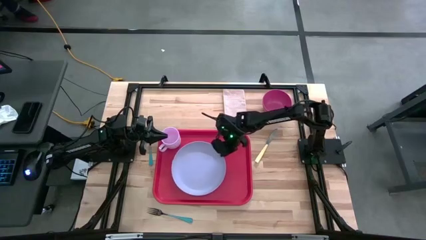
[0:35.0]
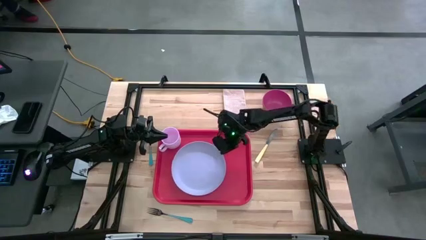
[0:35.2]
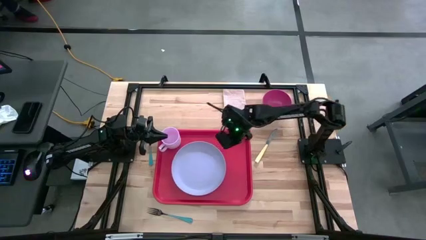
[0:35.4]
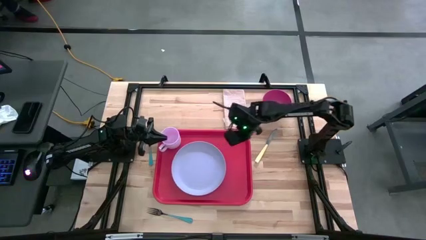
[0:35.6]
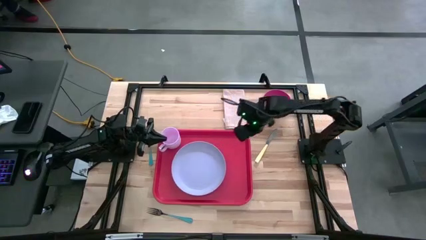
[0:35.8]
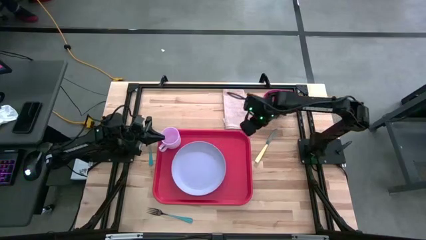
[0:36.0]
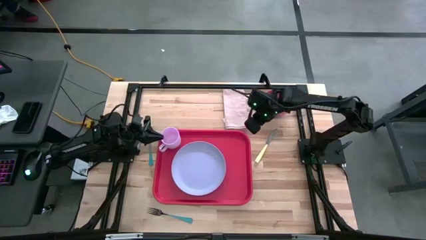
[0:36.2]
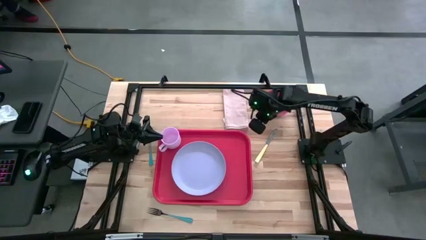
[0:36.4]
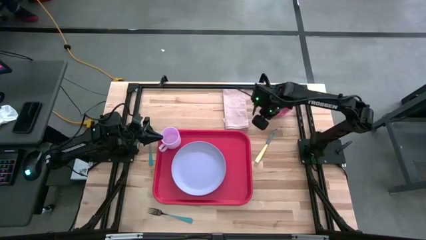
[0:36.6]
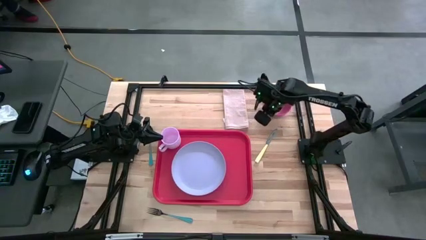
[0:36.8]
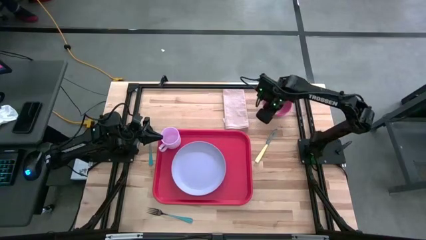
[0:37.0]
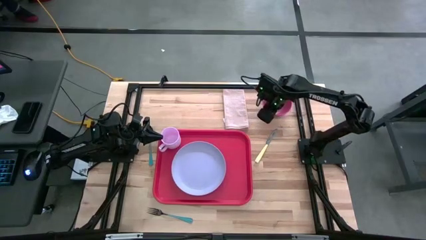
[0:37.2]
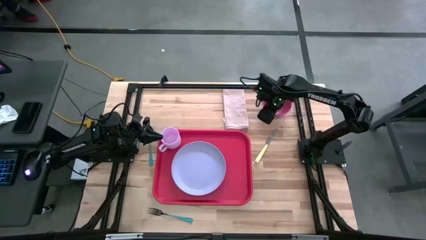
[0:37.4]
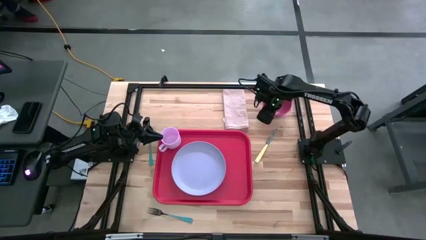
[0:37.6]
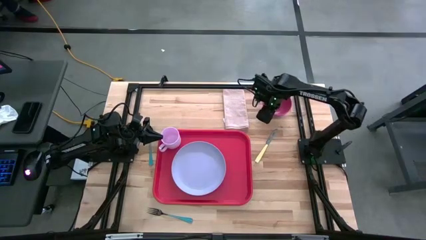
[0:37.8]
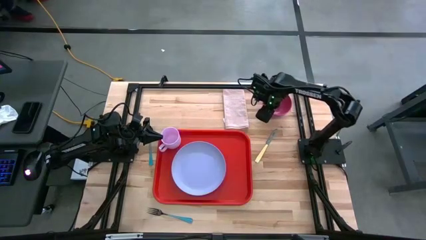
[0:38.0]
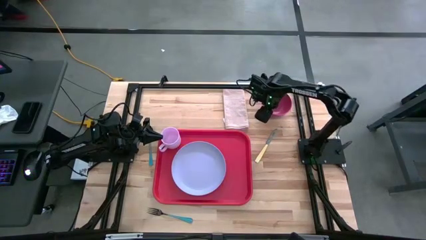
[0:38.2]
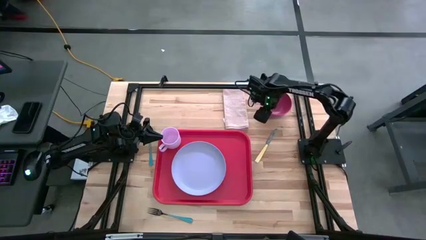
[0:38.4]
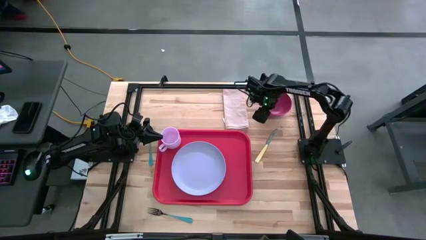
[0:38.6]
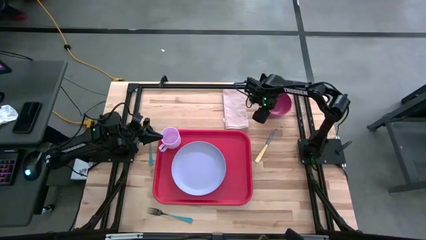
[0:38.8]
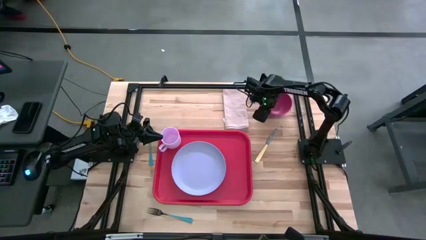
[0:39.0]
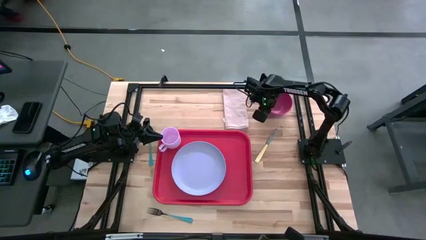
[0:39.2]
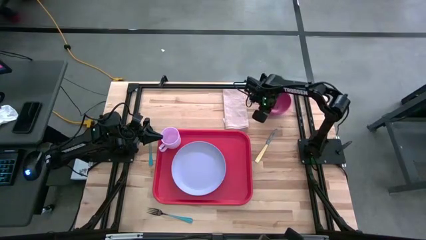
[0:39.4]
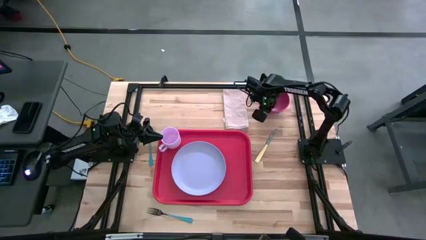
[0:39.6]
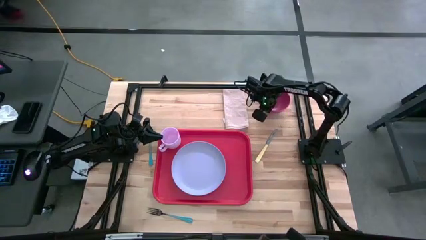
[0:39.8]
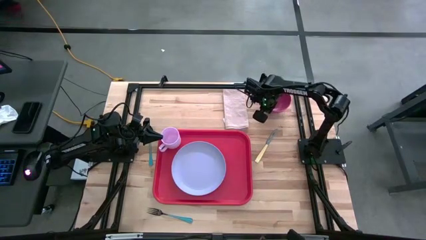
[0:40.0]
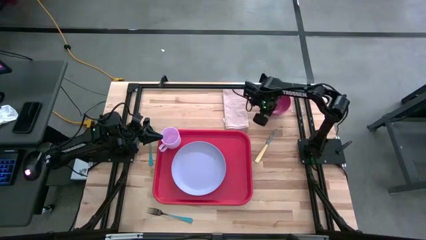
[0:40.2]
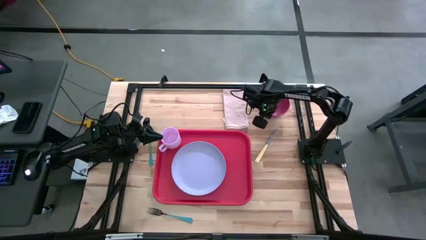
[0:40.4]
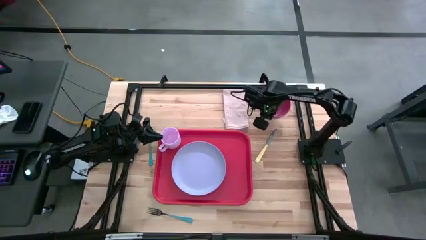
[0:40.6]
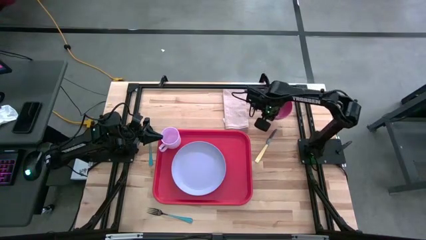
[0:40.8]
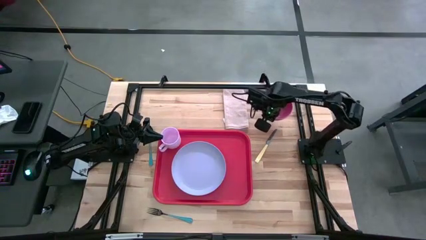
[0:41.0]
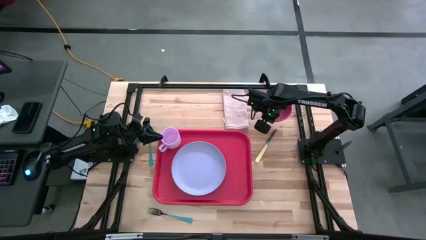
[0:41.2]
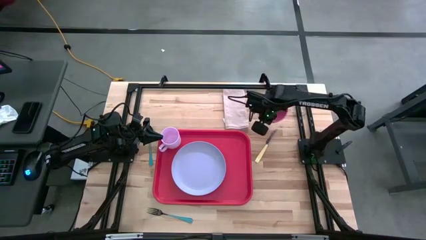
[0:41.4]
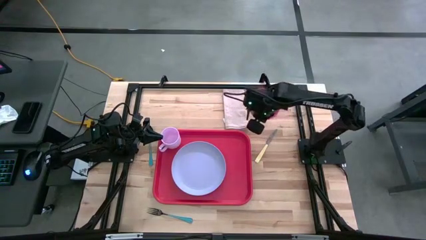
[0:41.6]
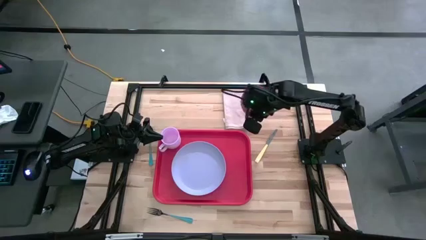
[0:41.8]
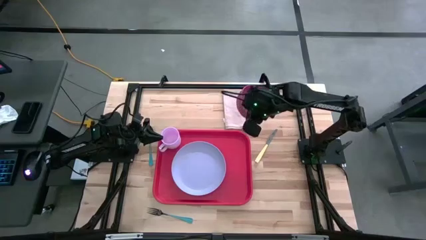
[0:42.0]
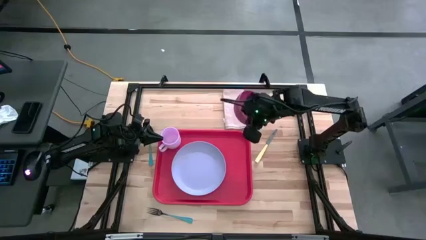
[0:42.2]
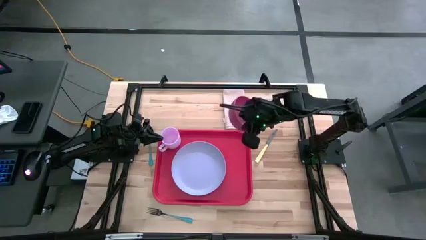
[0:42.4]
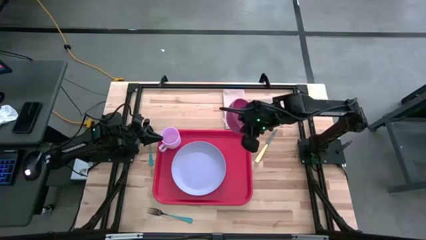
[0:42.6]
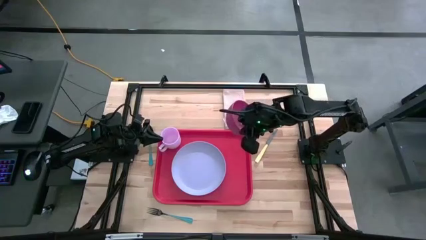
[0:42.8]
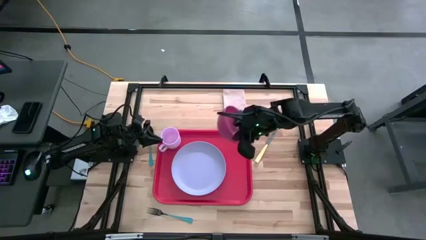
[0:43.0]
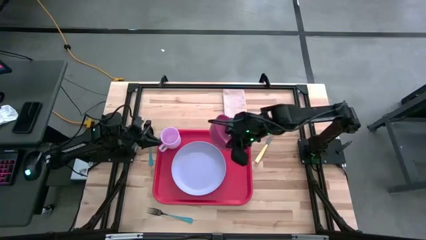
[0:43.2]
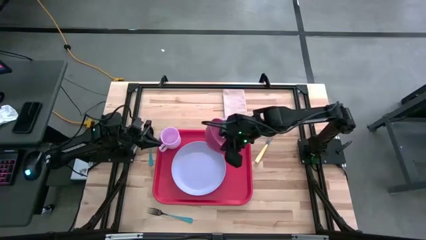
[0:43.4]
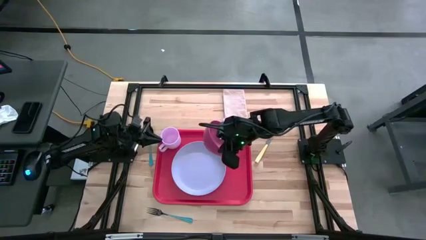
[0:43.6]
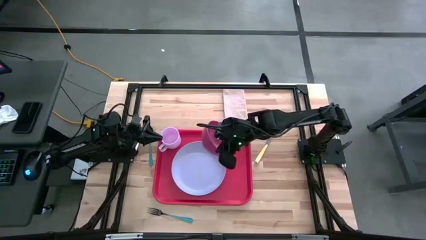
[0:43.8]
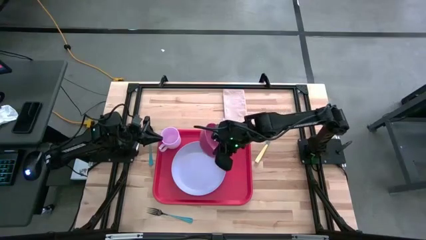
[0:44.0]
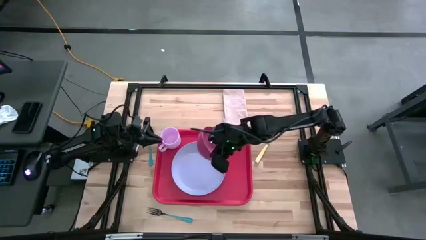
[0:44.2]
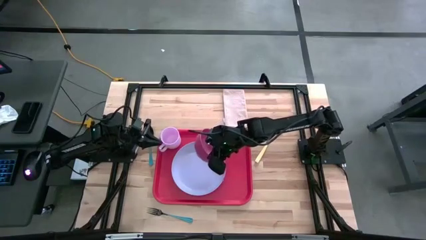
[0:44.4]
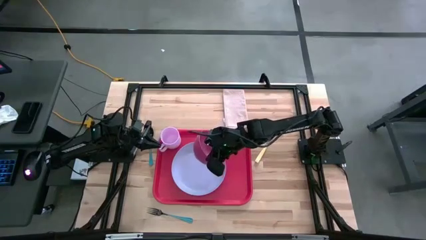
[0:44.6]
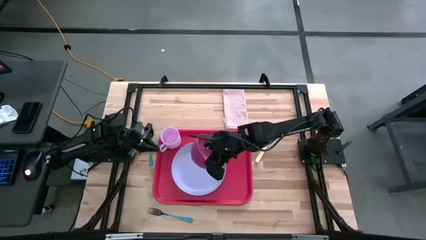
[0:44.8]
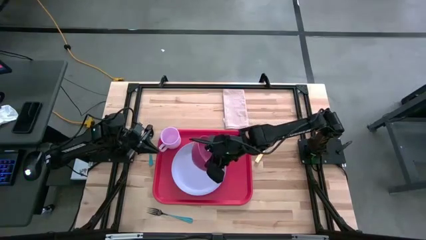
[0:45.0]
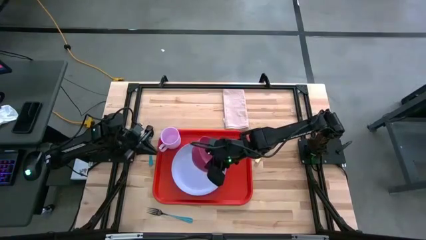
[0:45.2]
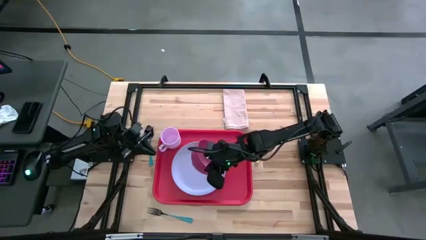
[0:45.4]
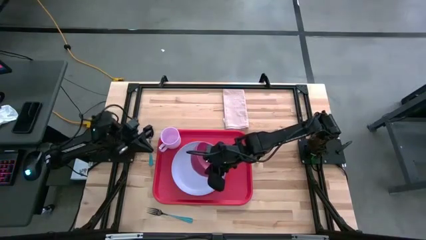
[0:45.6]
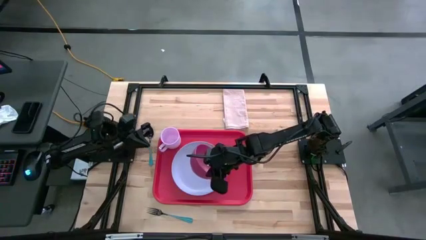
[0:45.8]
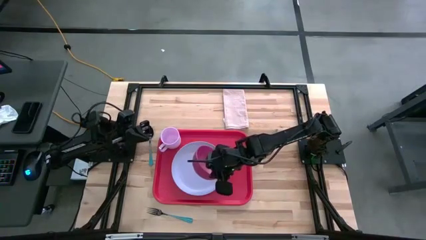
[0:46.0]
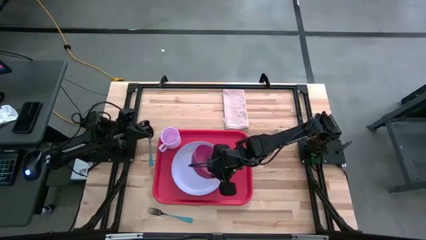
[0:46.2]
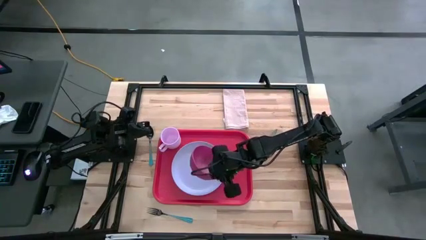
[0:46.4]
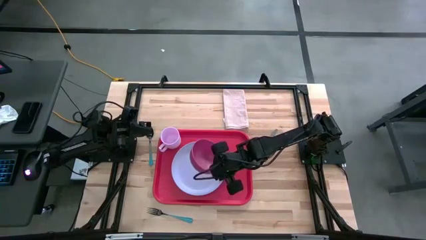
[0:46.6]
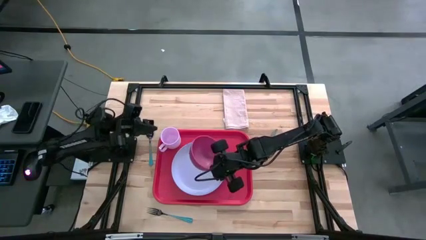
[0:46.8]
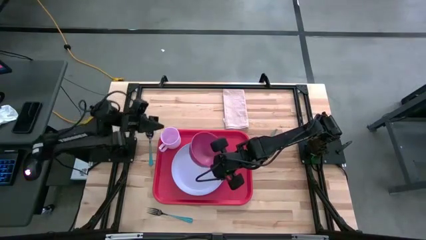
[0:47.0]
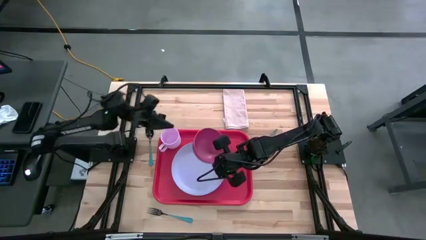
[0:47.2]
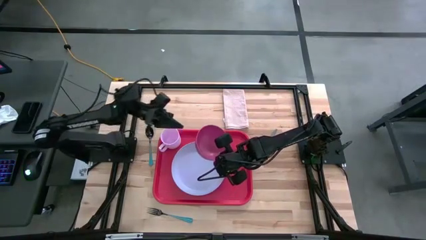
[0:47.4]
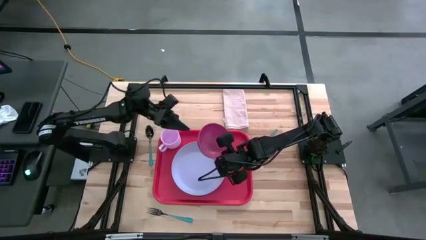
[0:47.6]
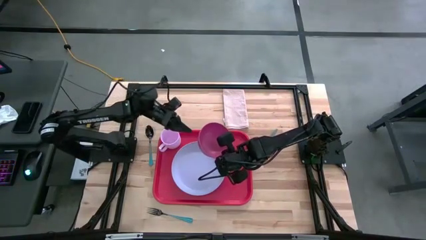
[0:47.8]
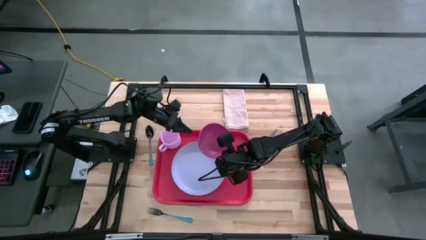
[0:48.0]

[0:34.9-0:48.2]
Task: Set up tray
Put the red bowl on top of the blue plate

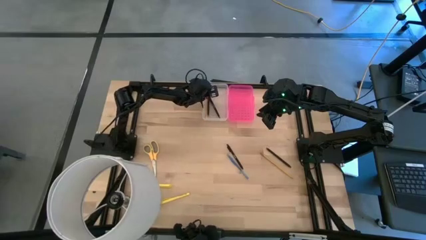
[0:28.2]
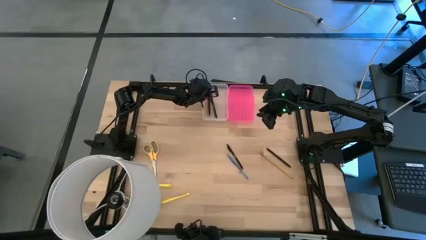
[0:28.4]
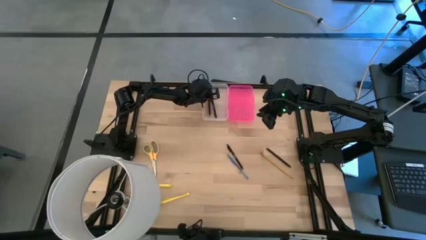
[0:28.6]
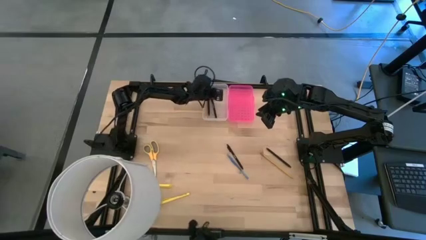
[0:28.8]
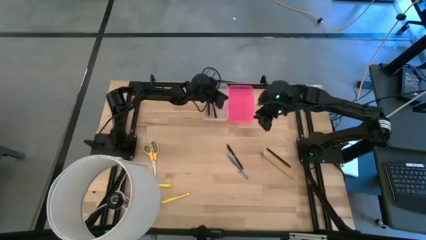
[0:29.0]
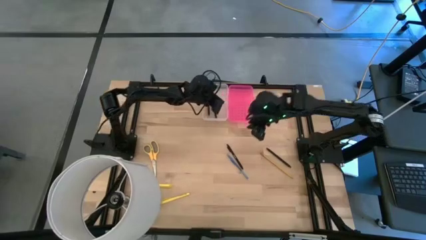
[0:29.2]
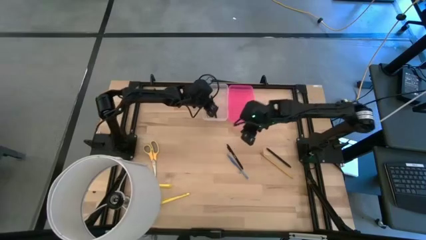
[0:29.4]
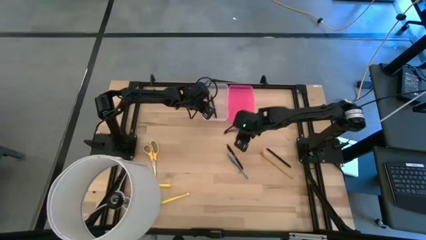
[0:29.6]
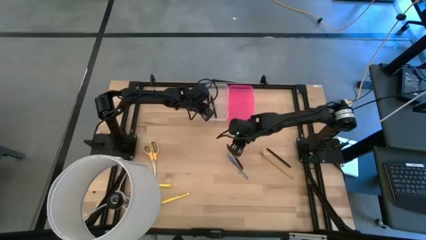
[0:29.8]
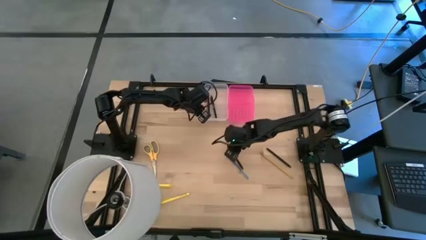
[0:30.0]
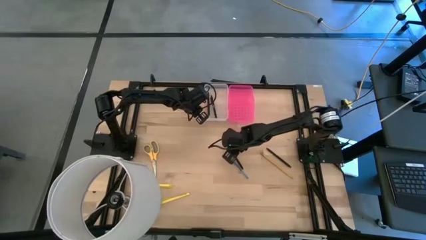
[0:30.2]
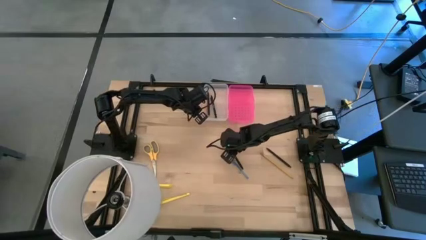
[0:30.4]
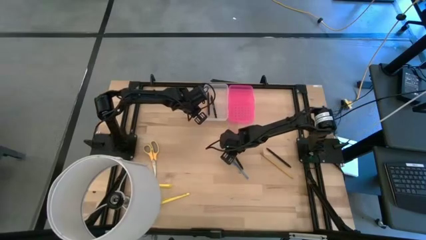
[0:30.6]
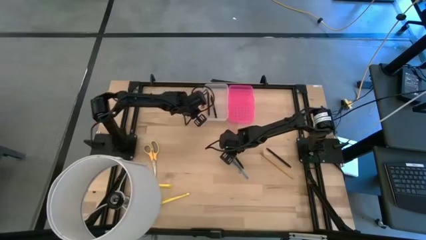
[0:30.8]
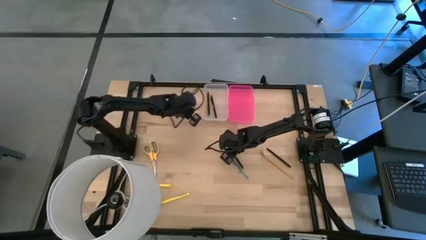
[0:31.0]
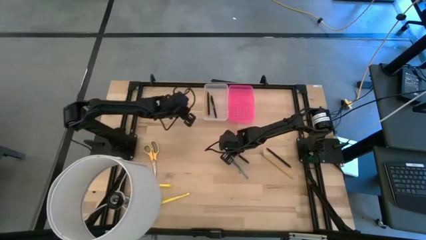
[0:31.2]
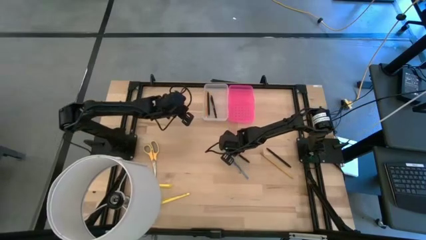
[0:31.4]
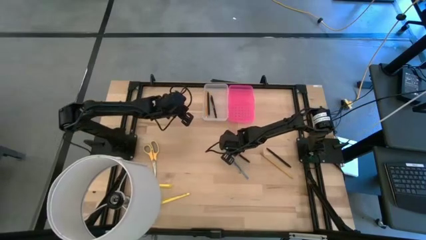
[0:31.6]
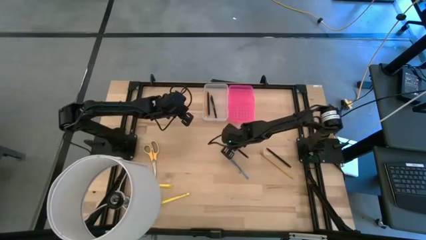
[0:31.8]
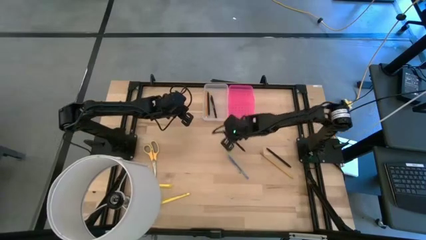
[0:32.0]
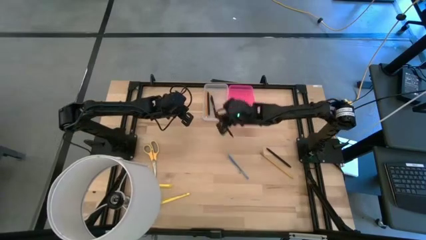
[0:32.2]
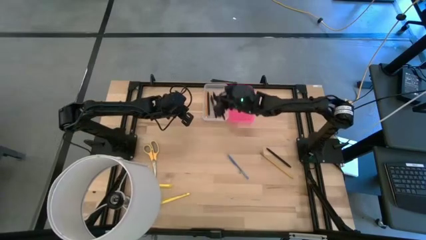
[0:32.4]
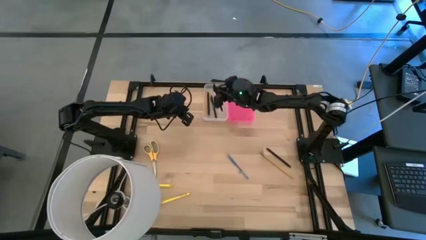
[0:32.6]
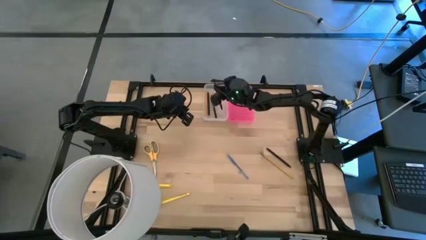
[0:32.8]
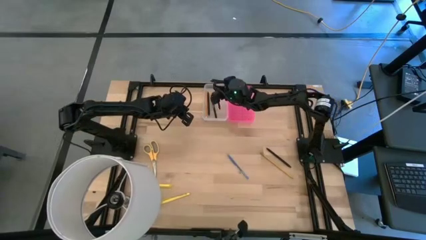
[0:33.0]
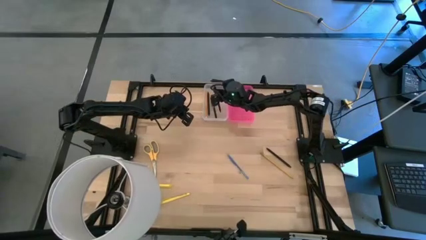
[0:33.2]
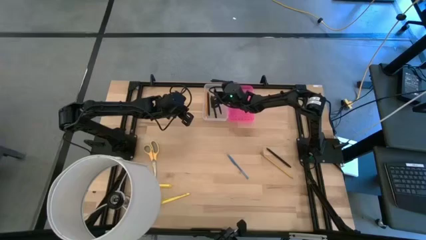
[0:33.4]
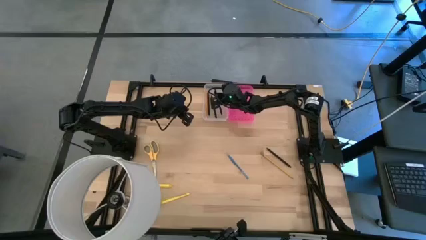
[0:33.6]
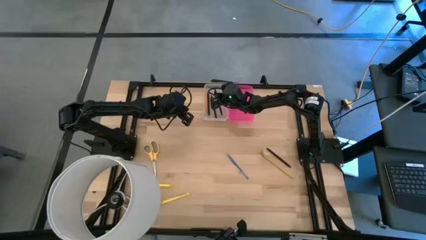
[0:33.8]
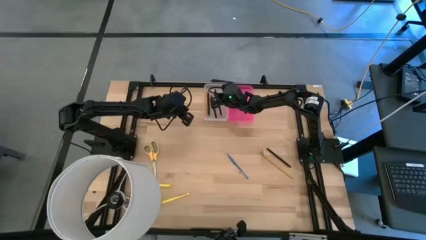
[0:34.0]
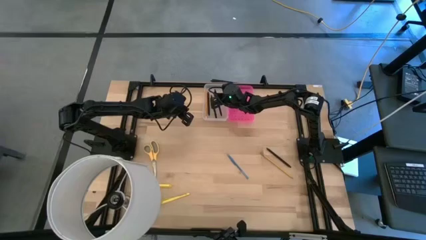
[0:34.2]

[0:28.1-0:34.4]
Task: Pick & place school supplies into a supply box
Put the black pen into the transparent supply box
